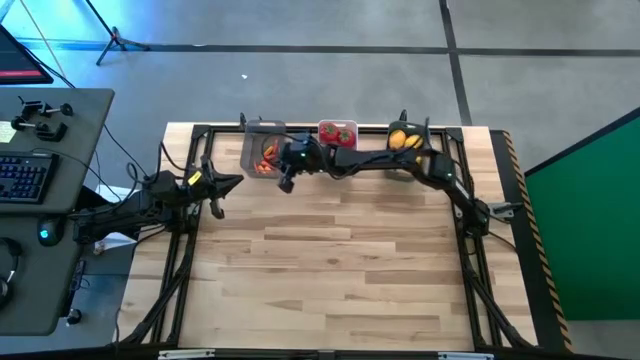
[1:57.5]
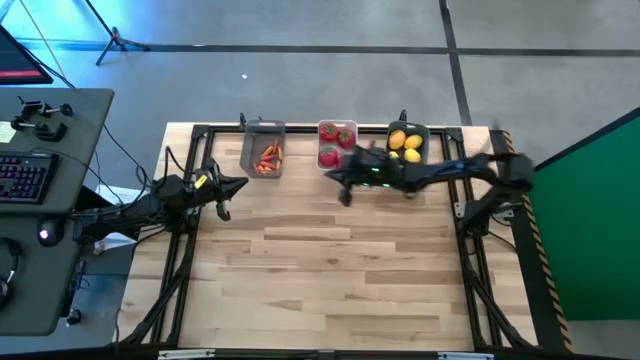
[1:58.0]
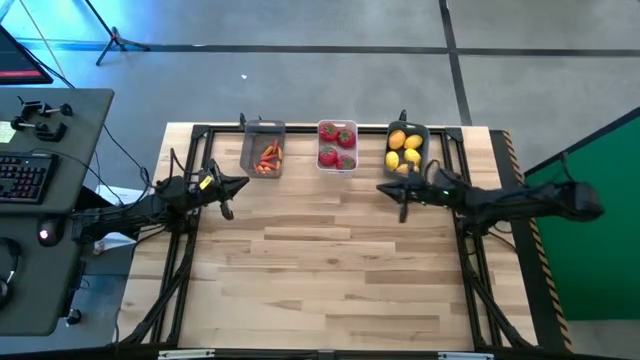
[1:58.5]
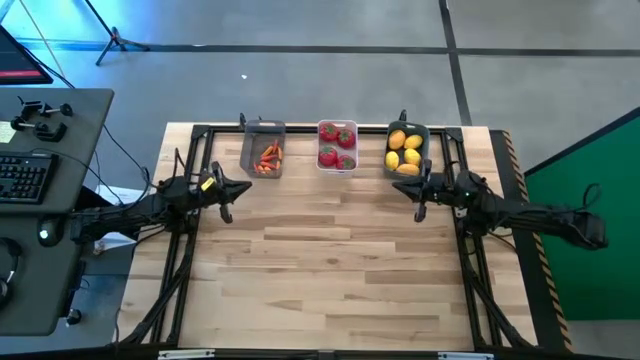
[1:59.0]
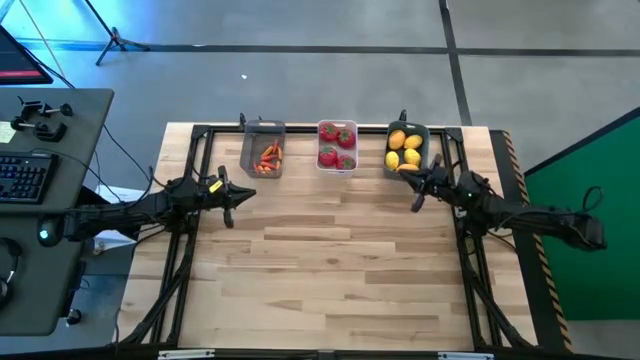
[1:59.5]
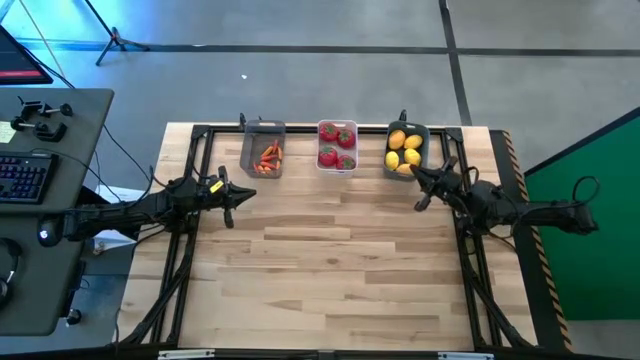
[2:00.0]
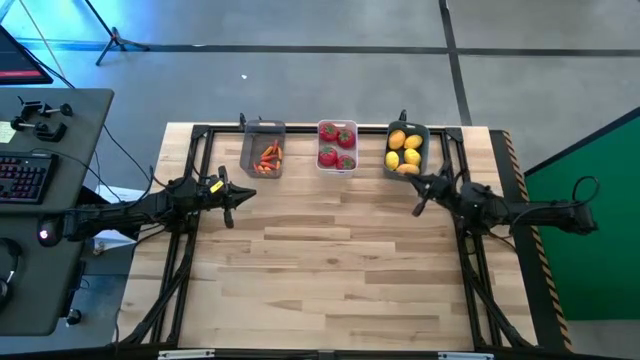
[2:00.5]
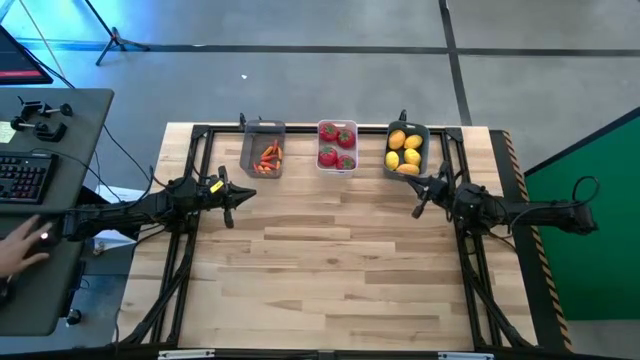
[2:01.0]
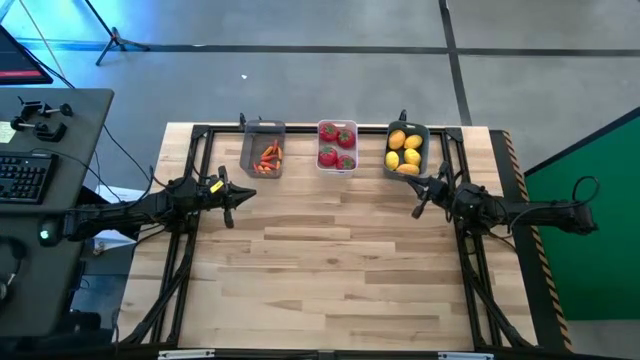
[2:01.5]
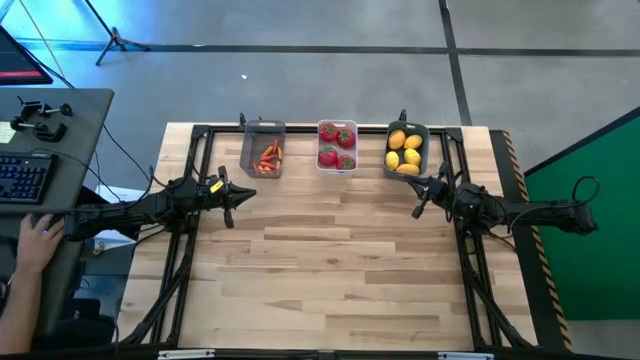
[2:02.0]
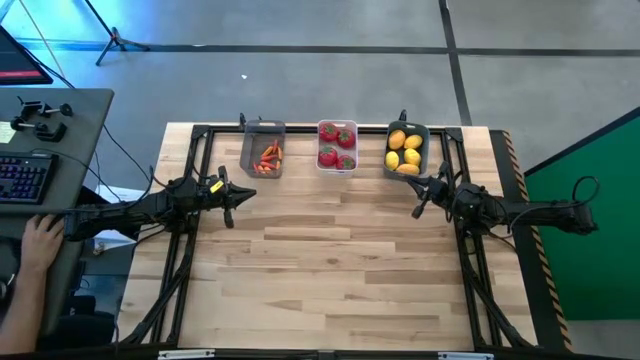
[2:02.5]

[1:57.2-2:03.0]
Task: Sort produce into baskets
Return to Home Position

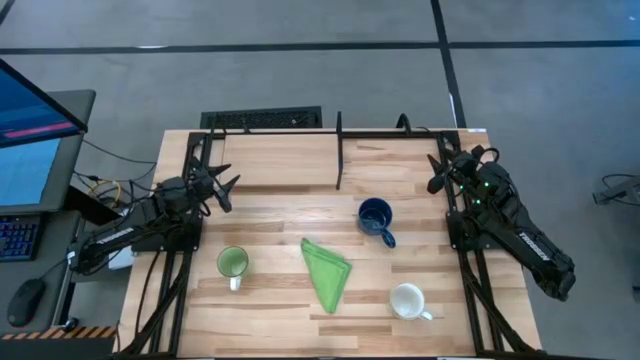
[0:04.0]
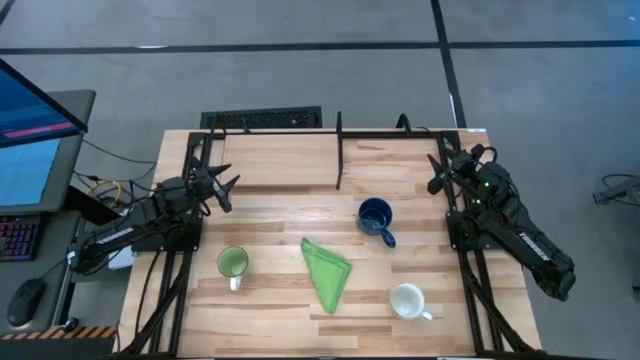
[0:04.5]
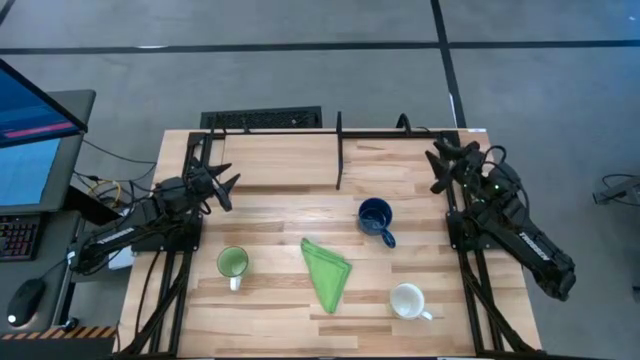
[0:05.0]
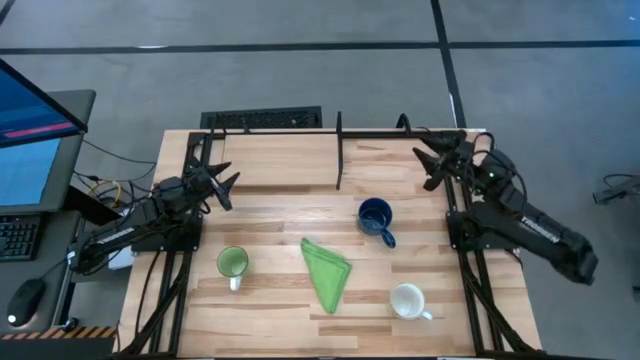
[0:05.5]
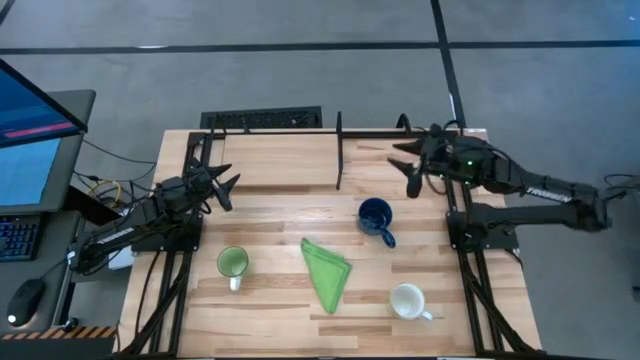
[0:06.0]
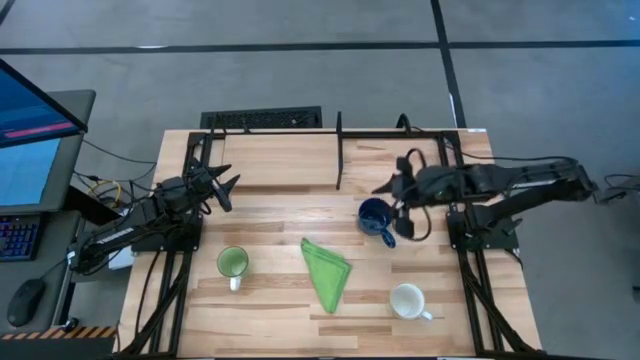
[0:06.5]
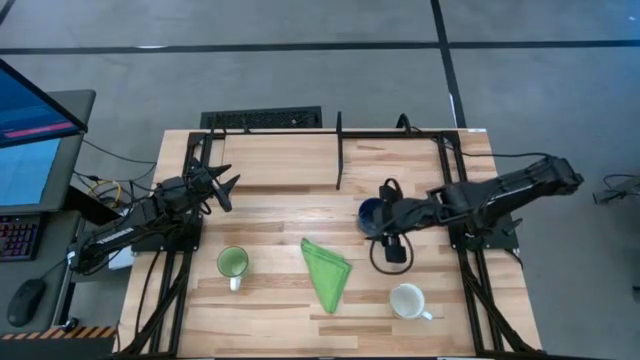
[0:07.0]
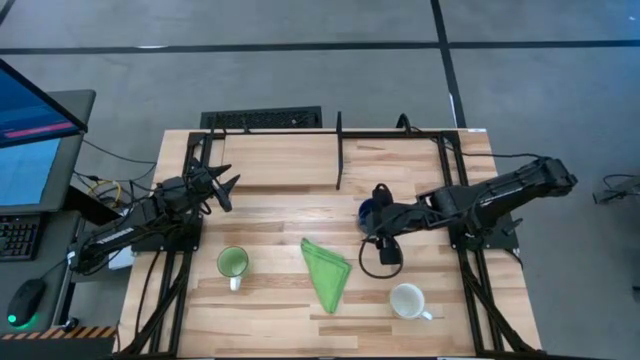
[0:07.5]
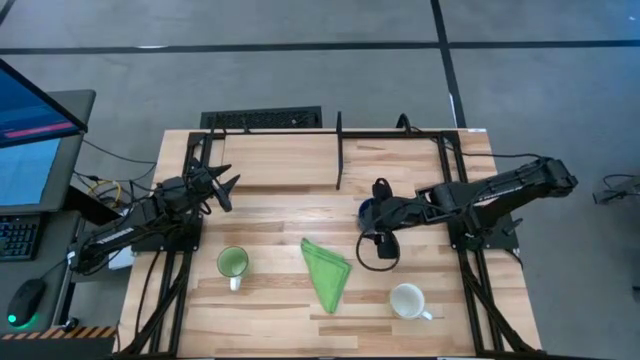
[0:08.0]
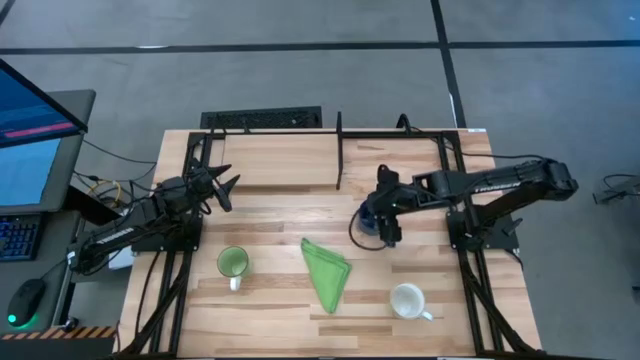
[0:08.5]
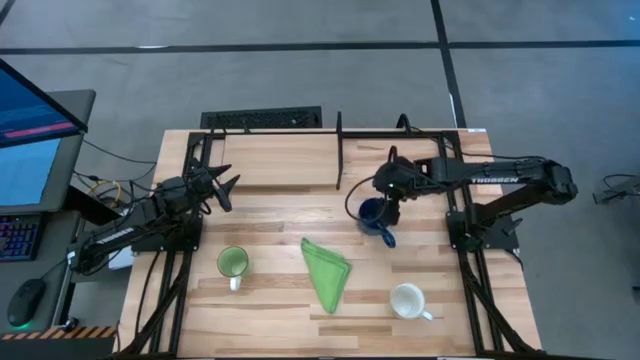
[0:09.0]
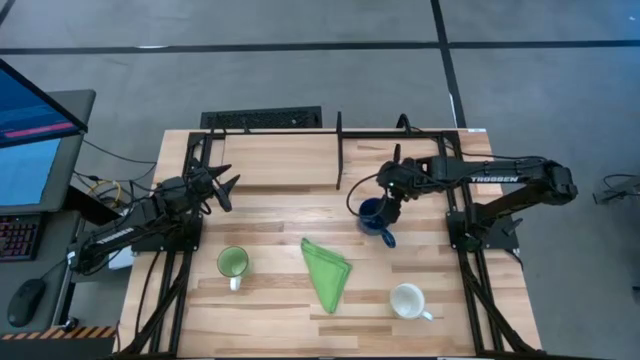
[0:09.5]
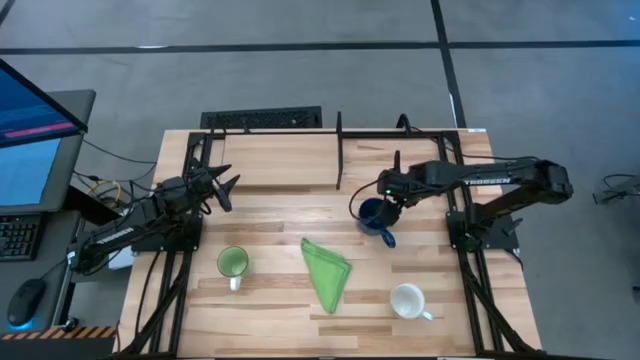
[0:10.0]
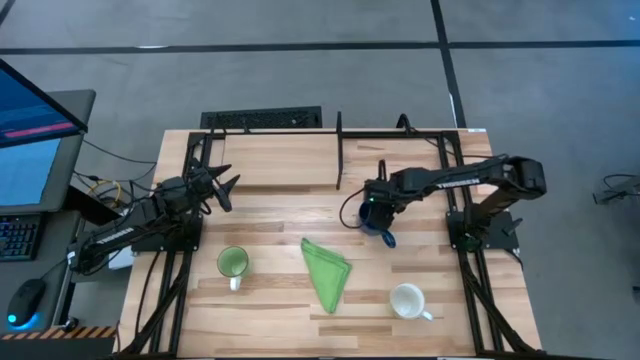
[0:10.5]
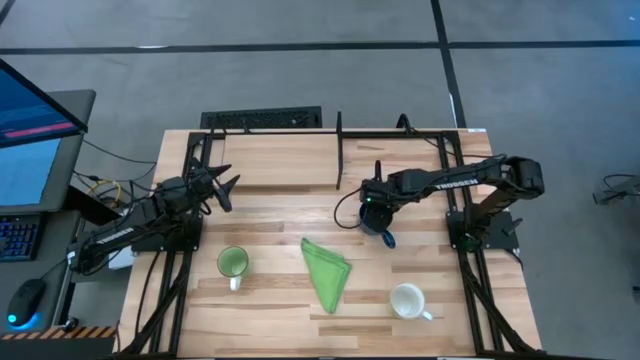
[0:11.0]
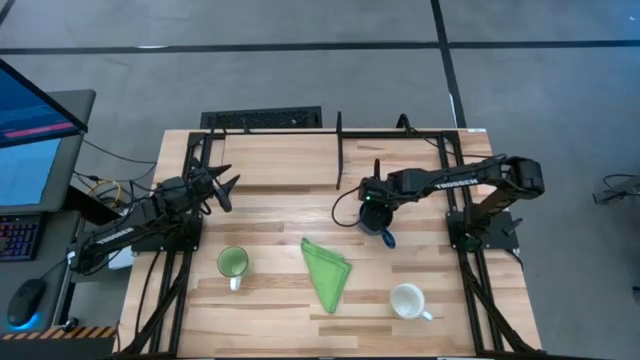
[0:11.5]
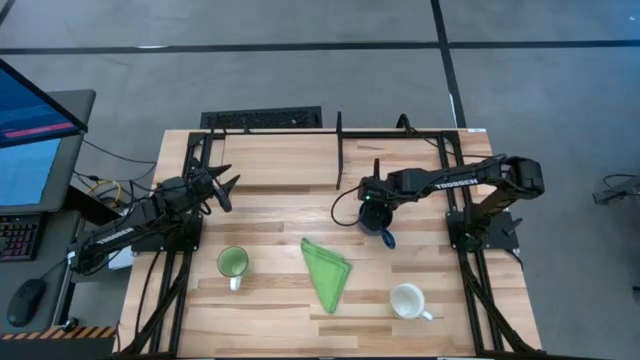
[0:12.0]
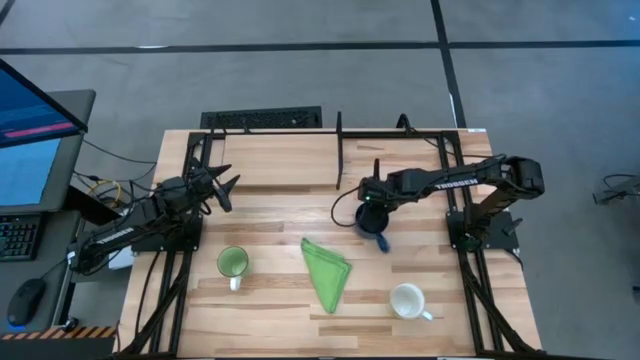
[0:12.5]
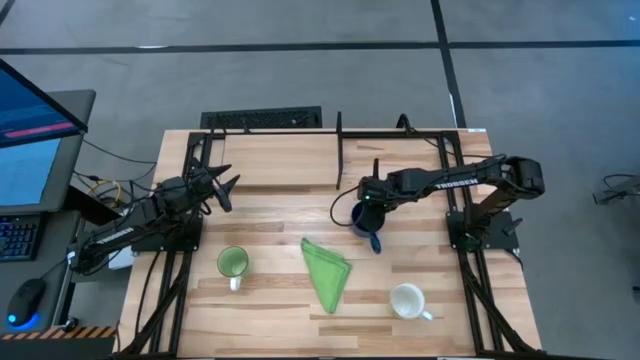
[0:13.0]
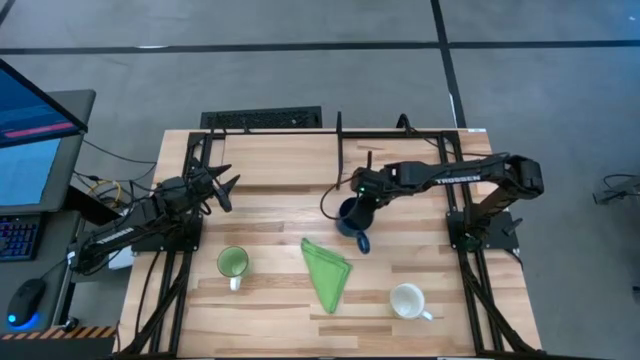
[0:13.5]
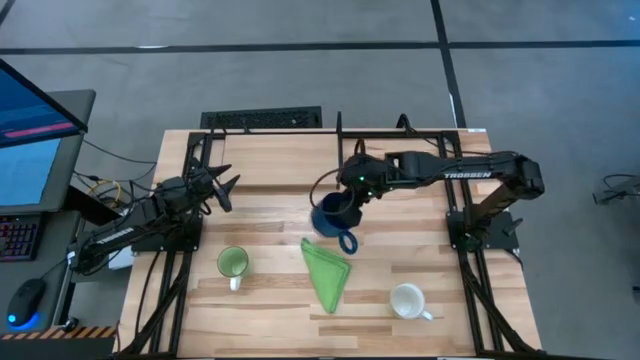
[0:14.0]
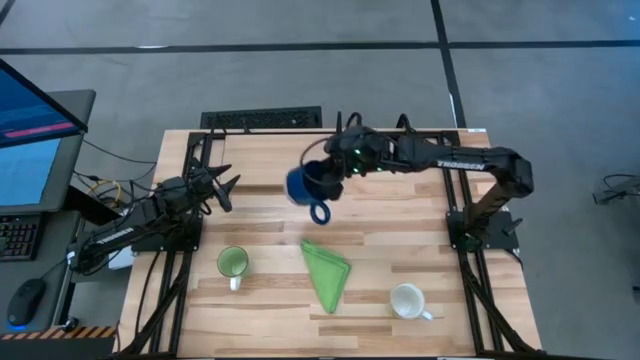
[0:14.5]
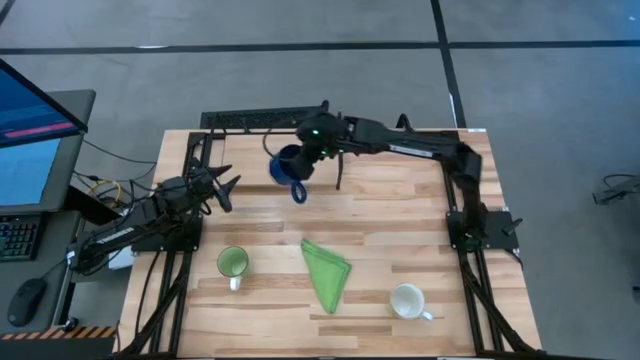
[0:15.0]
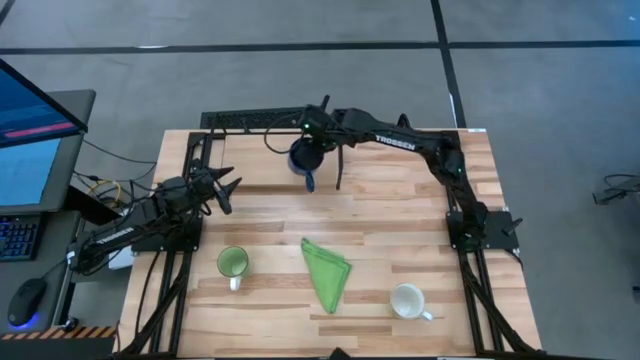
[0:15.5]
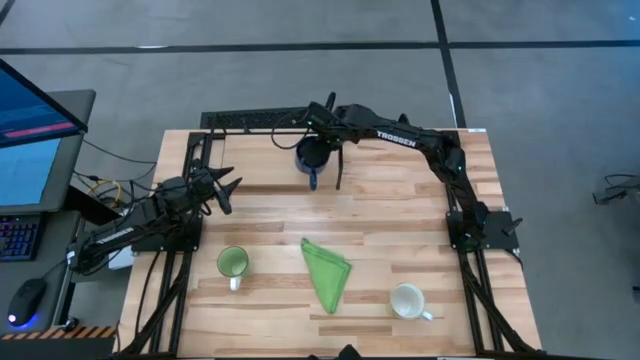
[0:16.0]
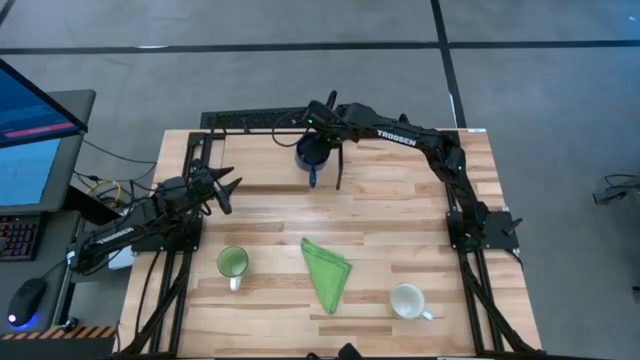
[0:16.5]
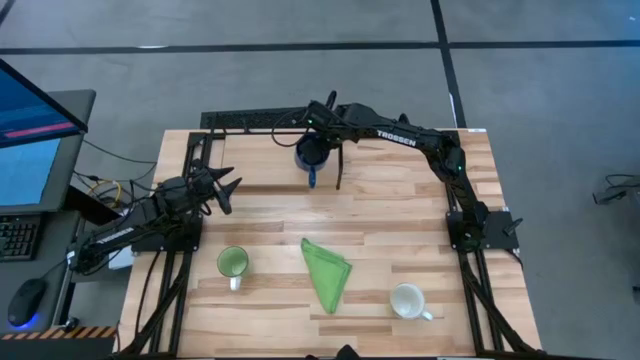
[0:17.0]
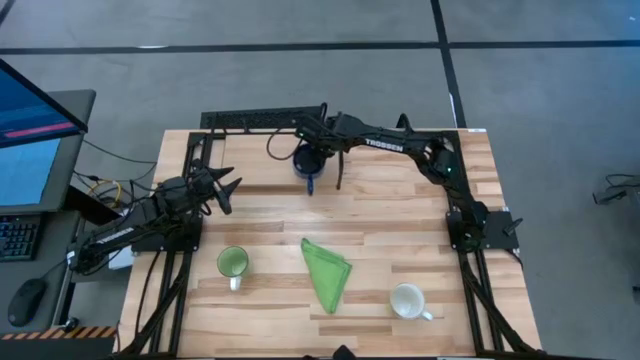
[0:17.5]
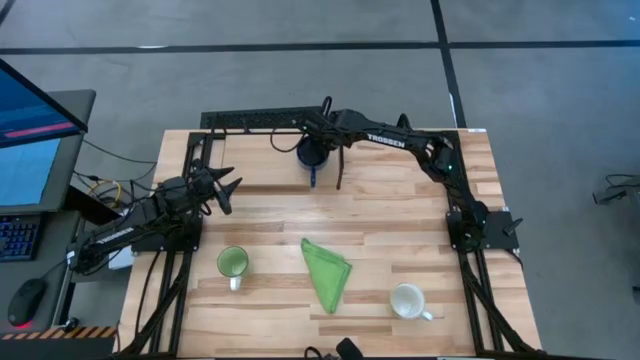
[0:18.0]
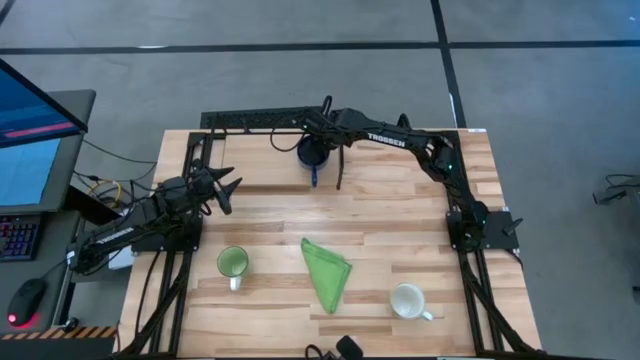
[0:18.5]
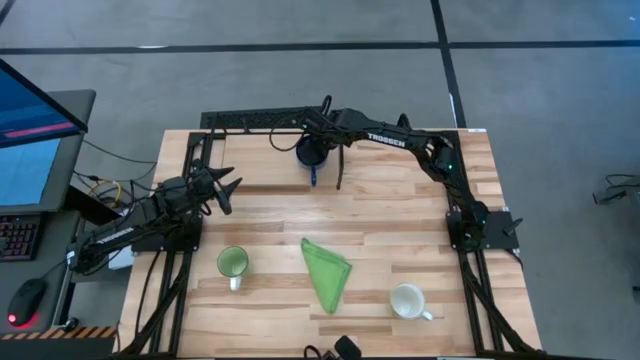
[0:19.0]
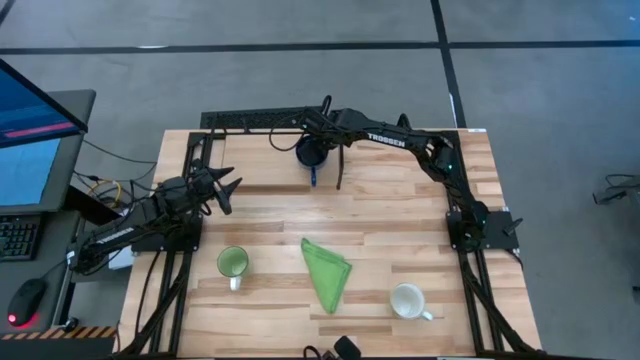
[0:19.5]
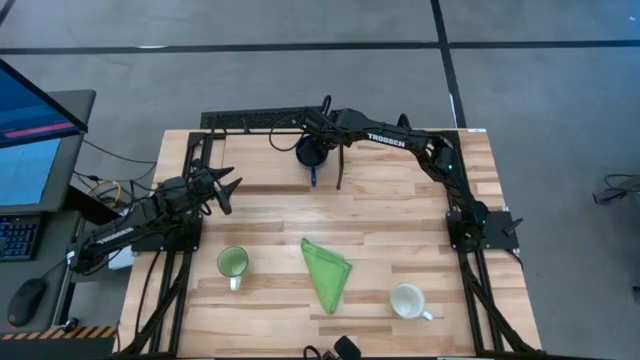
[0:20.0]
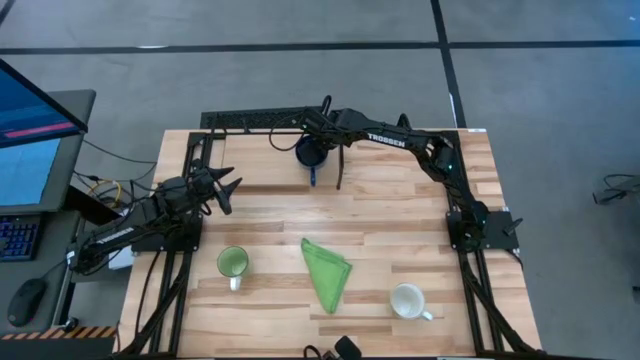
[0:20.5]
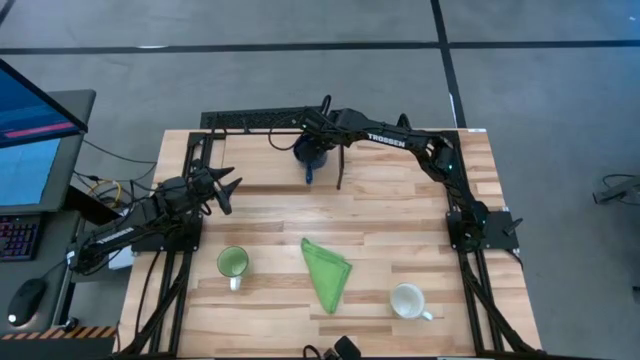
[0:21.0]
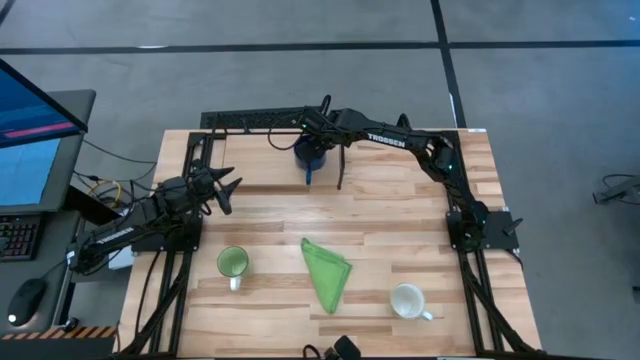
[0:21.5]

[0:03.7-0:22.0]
Task: Stack small to large cups/mugs on shelf
Put the blue mug on the shelf
